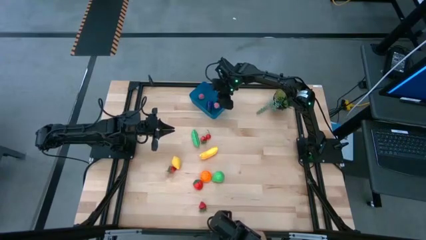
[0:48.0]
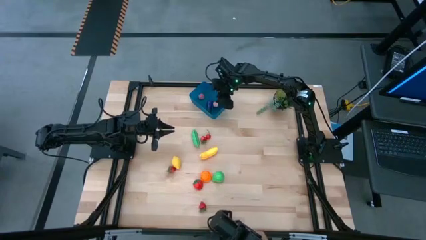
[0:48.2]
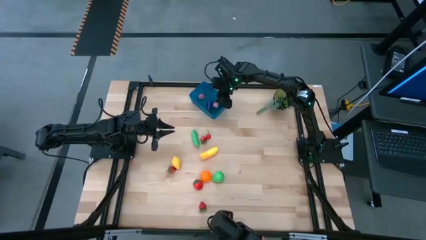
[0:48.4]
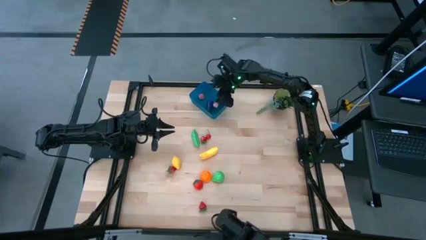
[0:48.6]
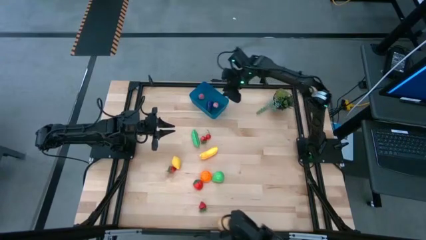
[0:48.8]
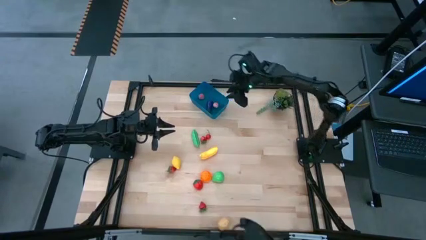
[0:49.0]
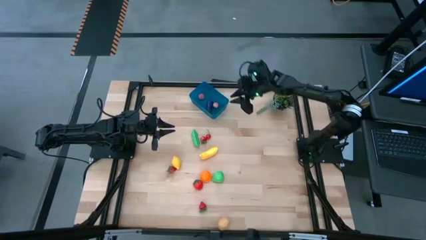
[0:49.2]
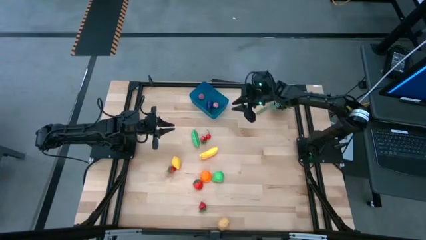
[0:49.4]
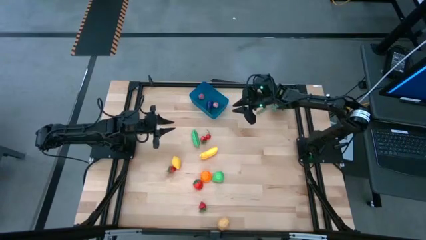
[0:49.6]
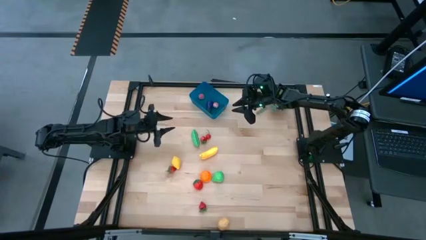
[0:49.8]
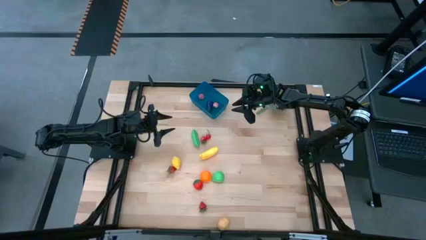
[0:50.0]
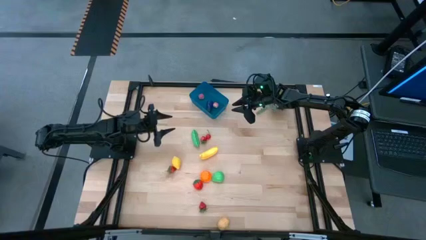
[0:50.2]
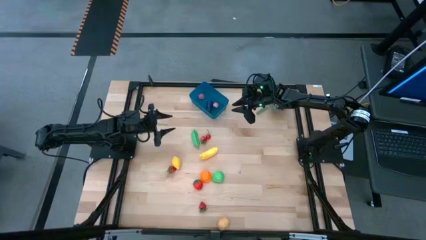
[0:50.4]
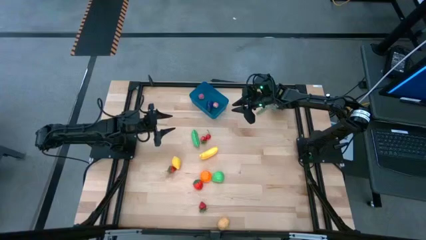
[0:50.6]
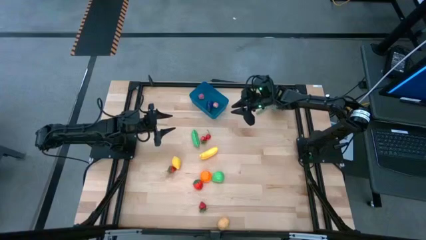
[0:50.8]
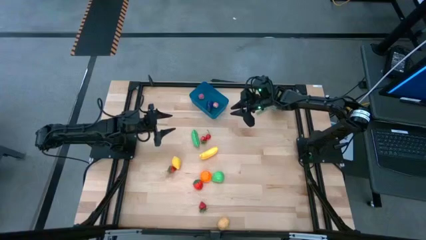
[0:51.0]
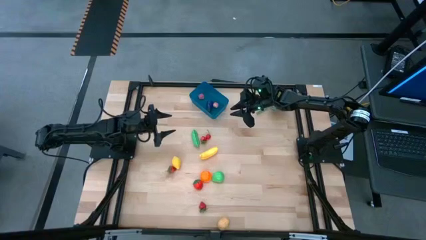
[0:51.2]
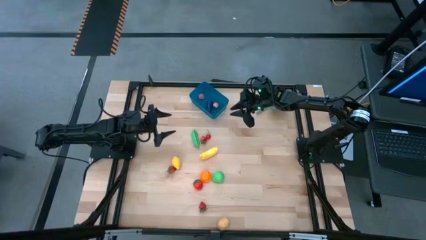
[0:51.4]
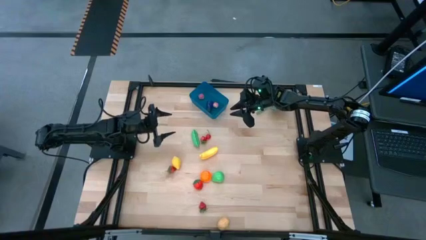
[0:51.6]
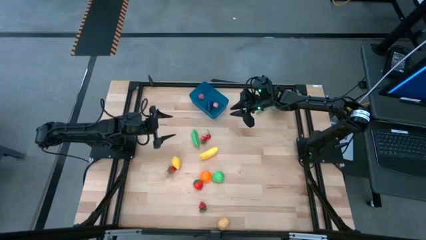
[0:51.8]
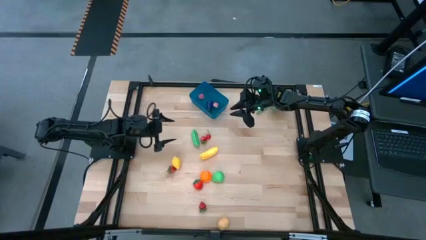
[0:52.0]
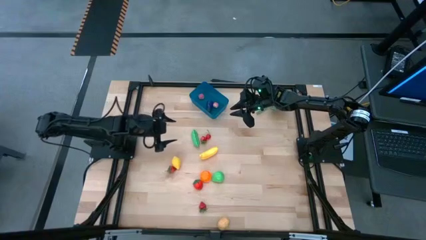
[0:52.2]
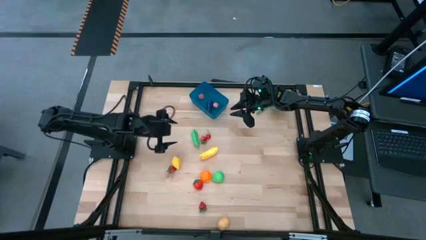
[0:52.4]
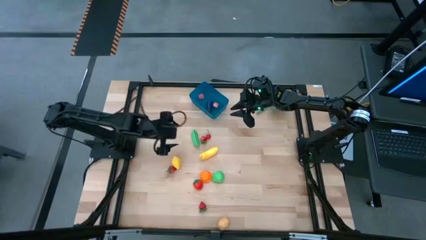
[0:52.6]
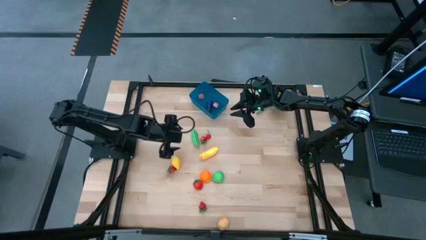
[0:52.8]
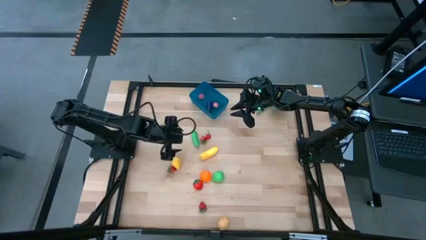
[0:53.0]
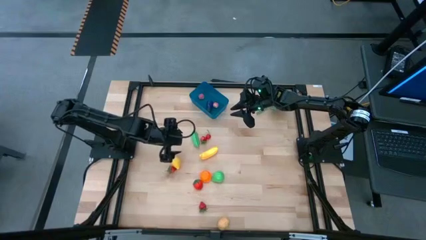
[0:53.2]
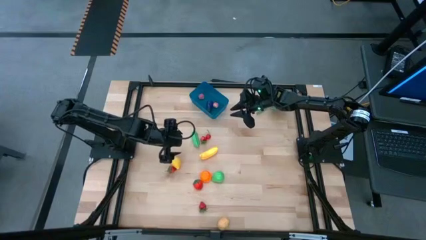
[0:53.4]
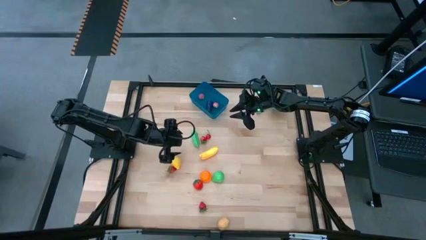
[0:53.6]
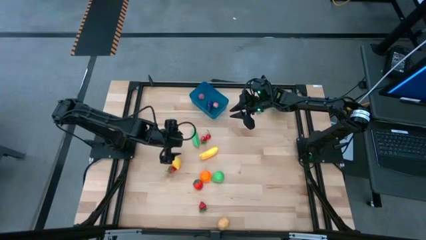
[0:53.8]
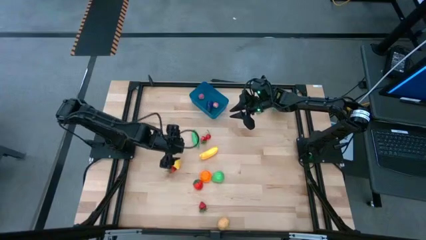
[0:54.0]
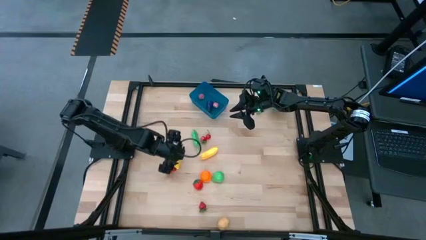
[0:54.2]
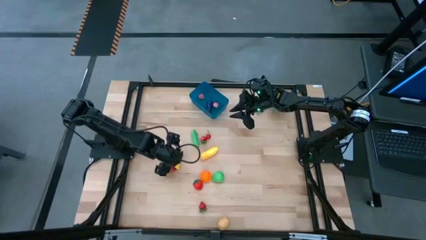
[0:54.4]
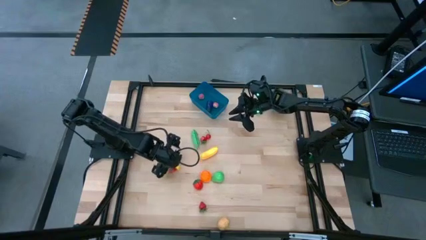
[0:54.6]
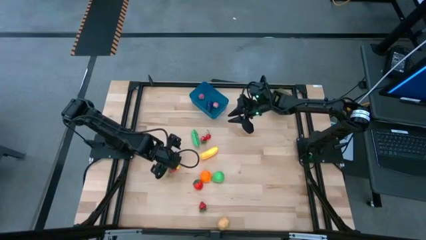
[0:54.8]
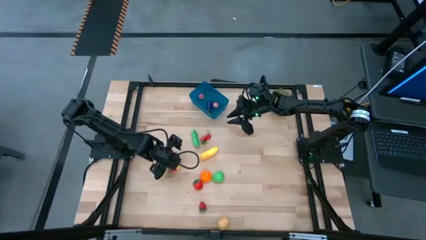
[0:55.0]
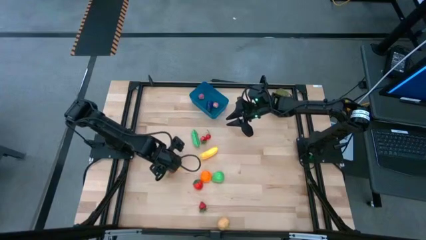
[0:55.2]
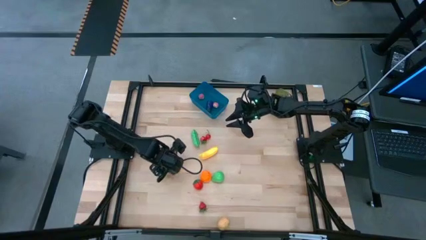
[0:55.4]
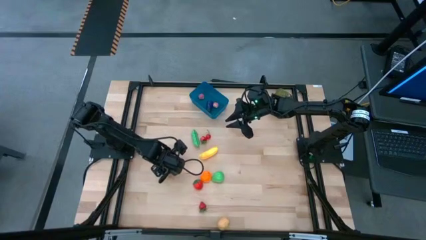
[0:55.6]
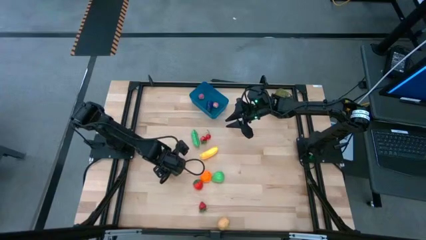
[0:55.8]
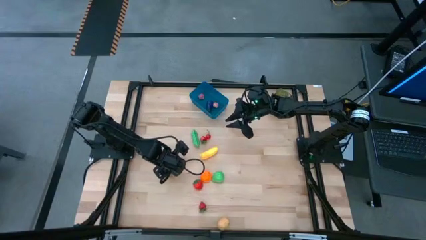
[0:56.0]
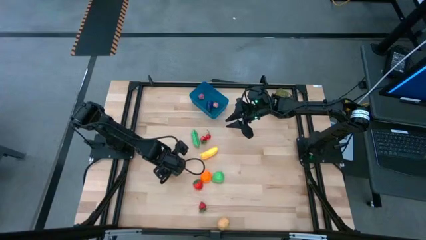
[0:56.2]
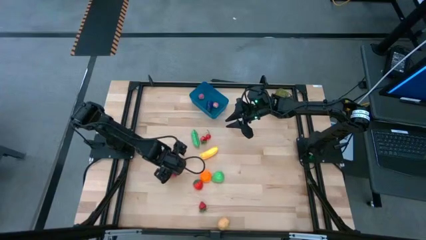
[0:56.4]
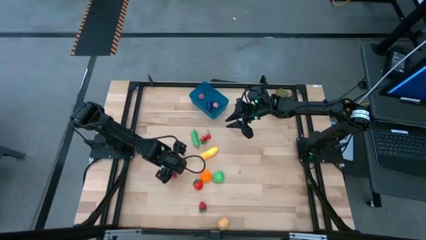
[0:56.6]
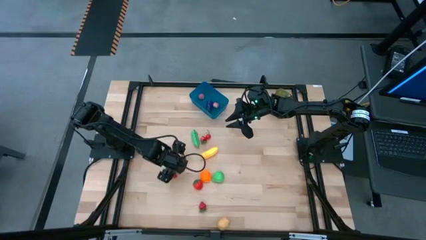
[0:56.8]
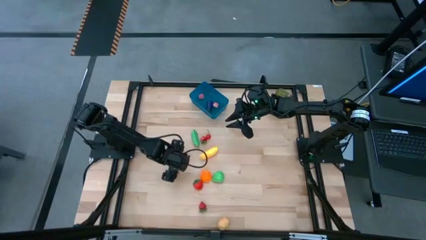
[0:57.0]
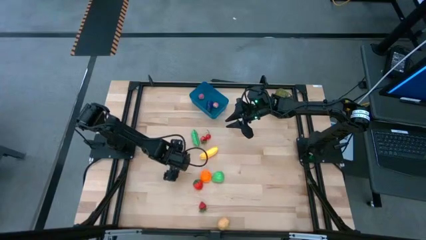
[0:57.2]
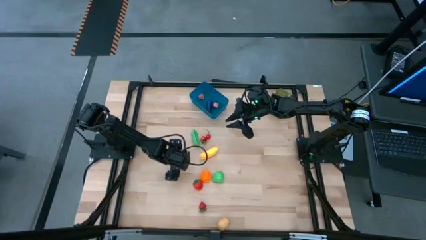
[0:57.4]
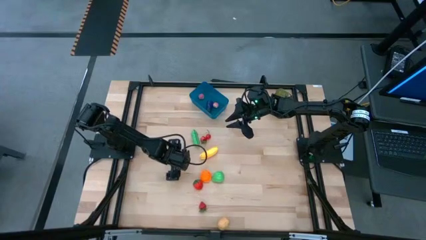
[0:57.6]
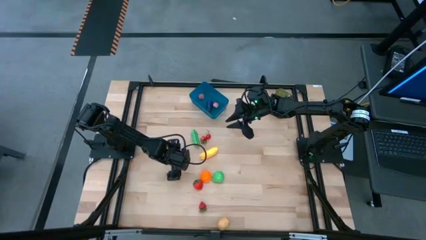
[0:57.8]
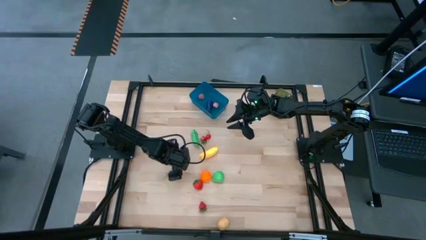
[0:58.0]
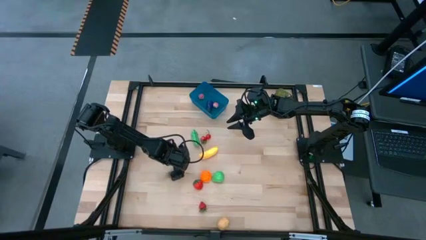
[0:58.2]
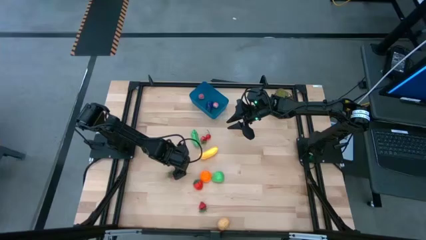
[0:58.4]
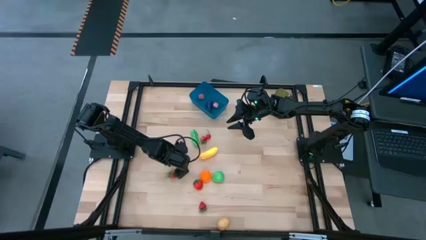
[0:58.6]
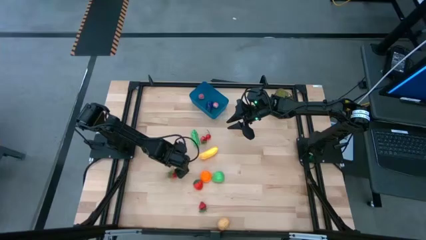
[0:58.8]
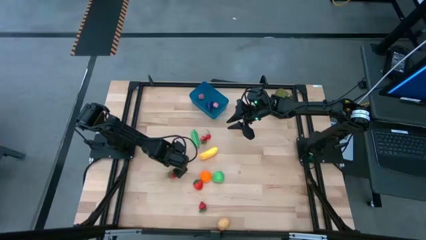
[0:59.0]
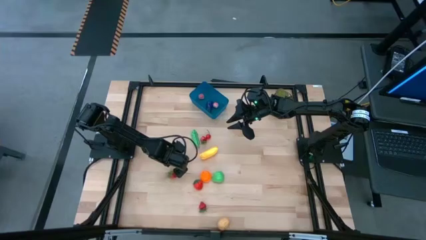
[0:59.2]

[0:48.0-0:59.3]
Task: Pick and placing Produce into tupperware
Put the yellow lemon into the blue bin

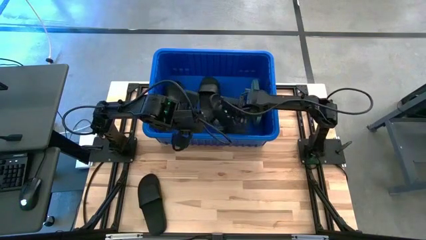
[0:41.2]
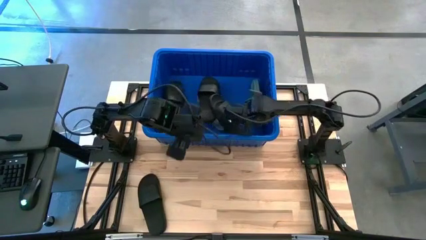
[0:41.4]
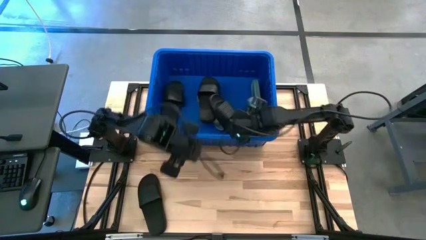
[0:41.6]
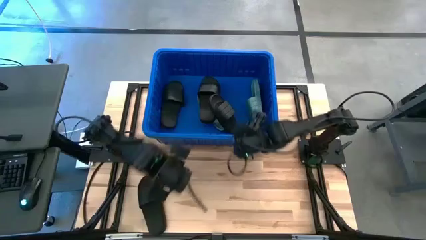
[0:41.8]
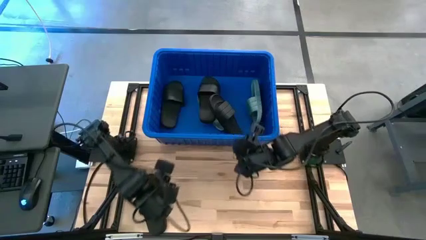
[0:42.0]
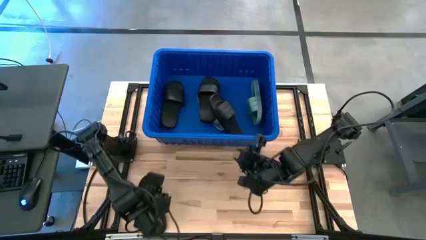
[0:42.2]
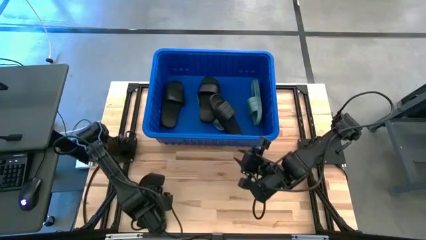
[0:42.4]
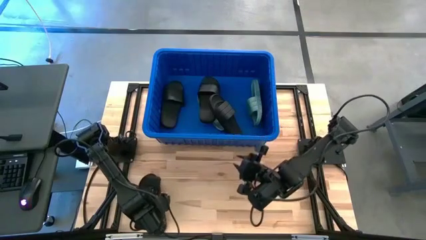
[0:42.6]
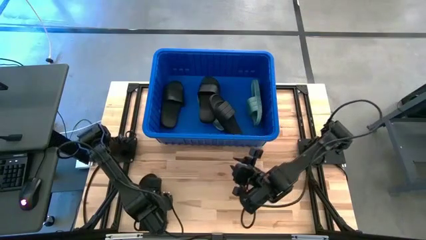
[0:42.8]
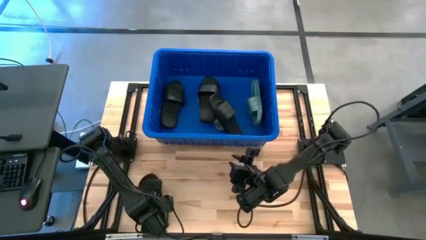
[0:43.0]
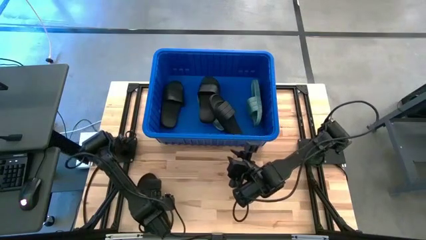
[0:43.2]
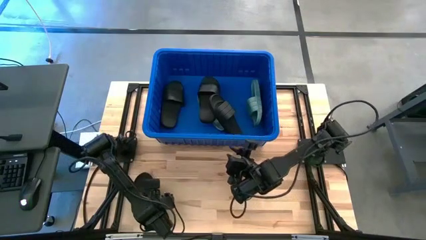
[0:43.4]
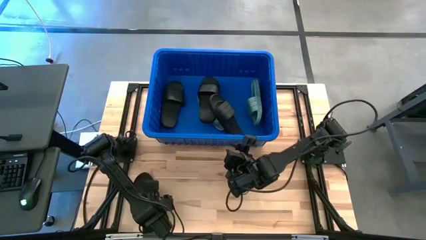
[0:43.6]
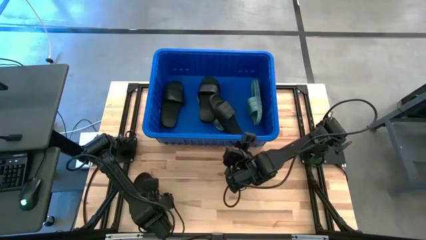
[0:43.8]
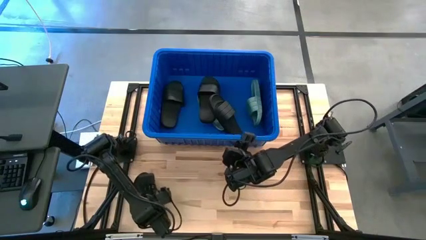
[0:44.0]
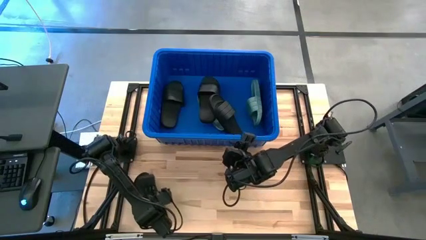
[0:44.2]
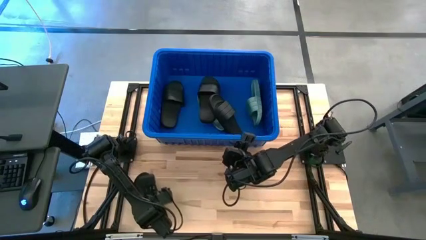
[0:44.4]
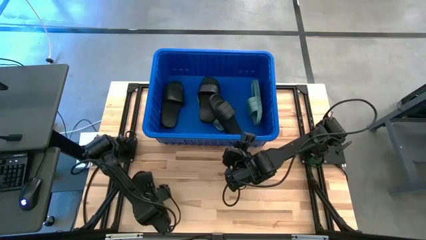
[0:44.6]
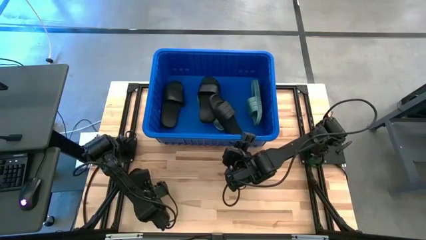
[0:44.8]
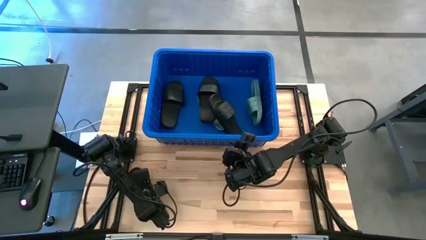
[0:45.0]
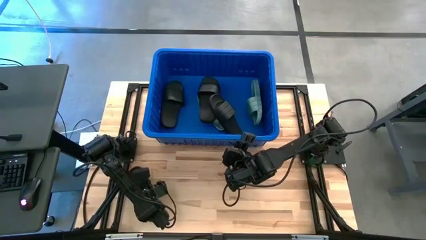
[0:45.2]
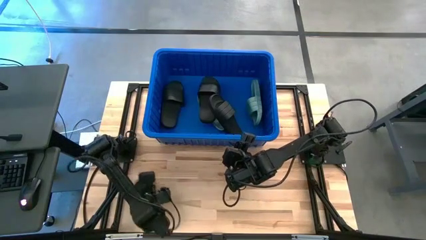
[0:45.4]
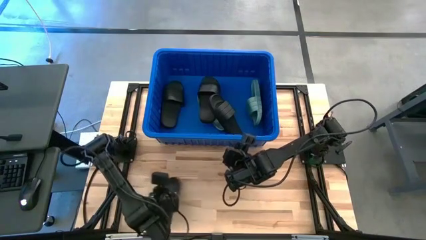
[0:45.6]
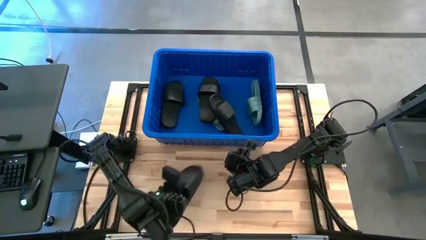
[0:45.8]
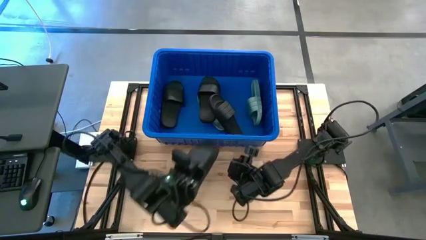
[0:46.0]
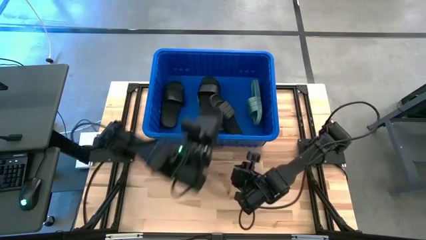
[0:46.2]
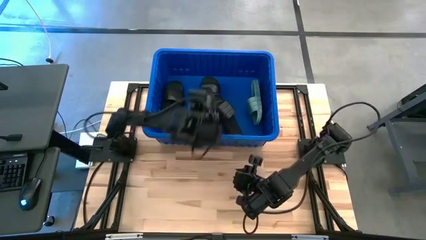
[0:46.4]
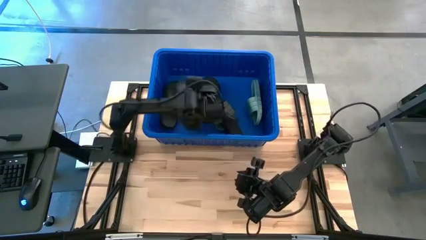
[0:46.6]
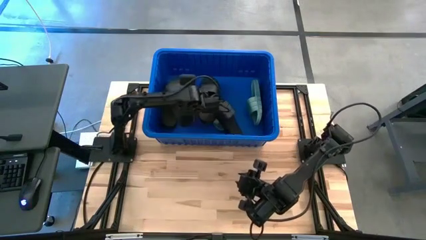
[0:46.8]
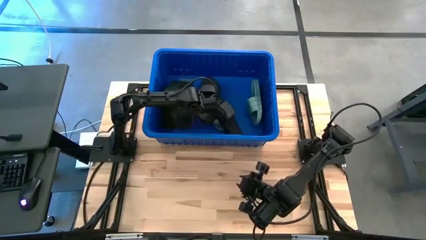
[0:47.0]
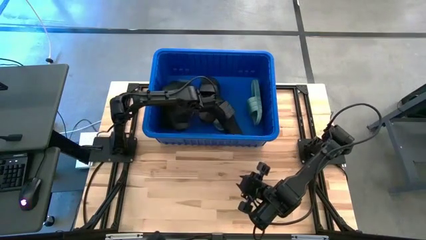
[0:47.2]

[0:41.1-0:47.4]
Task: Pick and place slides into bin
Put the black slide into the blue bin

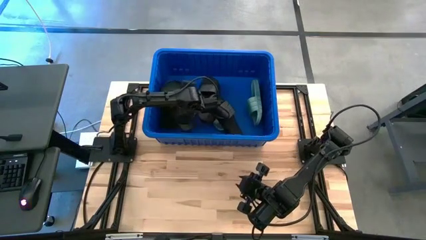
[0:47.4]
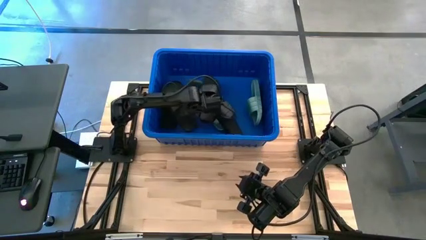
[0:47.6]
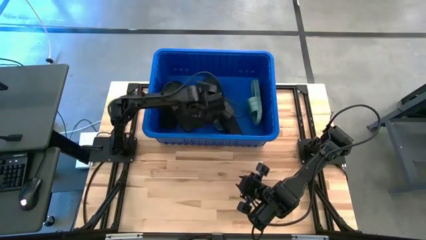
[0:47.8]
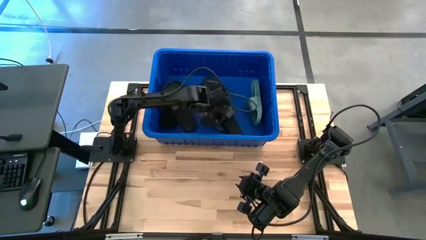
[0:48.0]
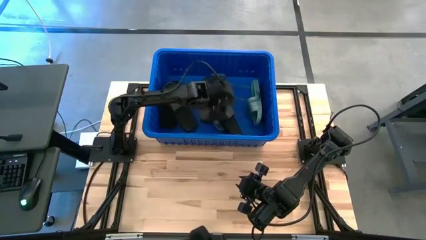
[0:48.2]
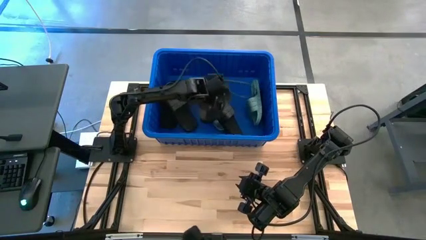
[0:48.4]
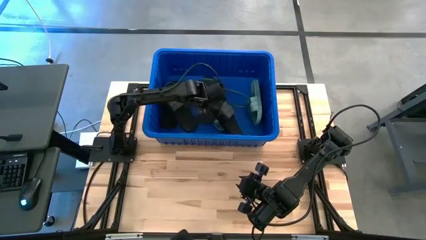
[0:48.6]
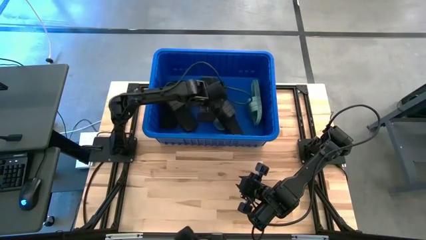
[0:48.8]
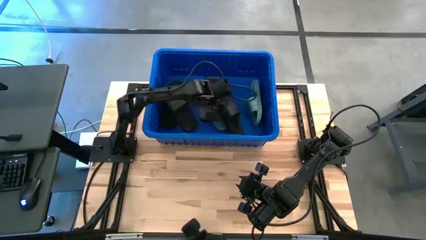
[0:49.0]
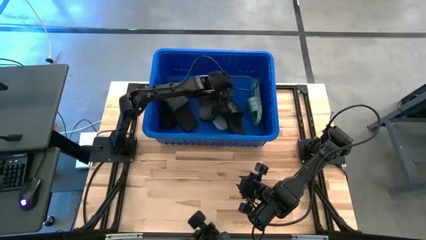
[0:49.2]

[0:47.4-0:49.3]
Adjust the black slide in the blue bin
